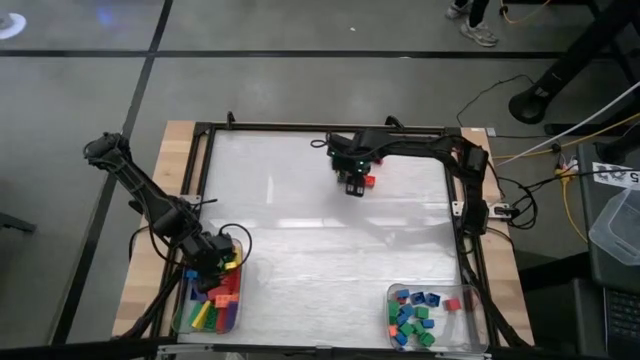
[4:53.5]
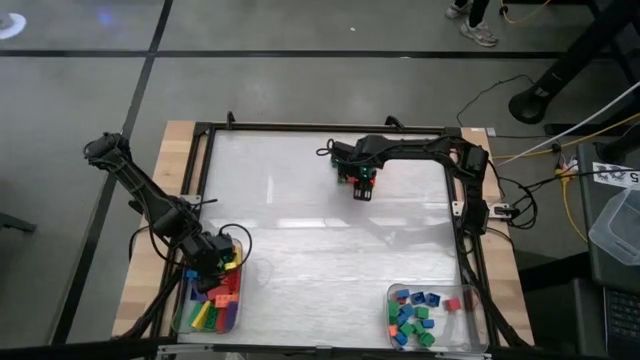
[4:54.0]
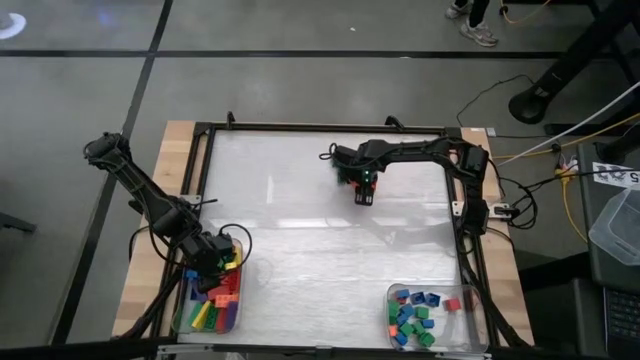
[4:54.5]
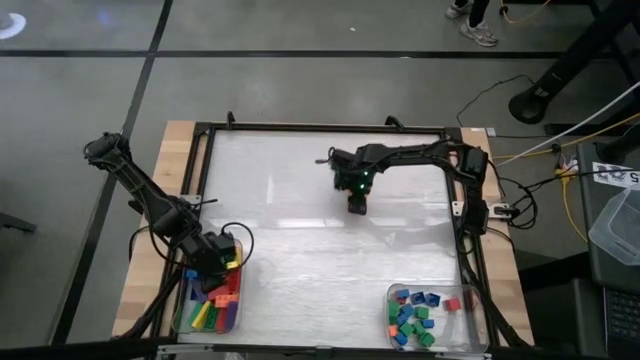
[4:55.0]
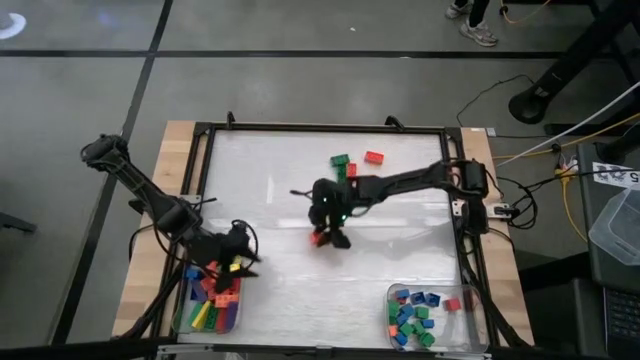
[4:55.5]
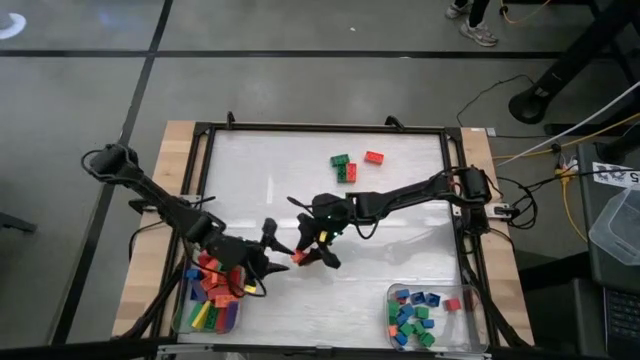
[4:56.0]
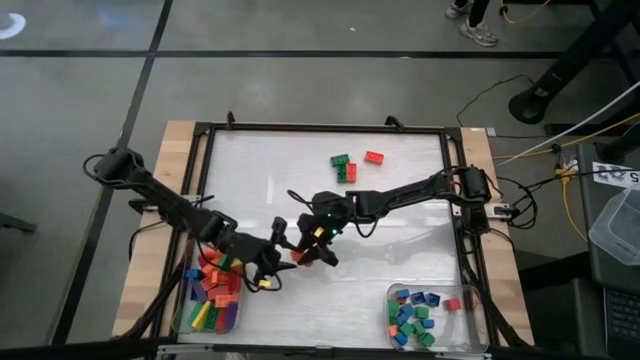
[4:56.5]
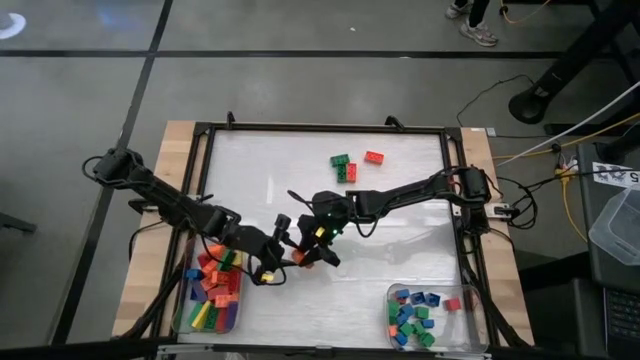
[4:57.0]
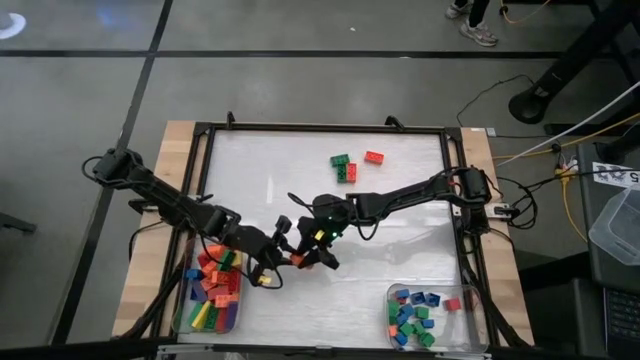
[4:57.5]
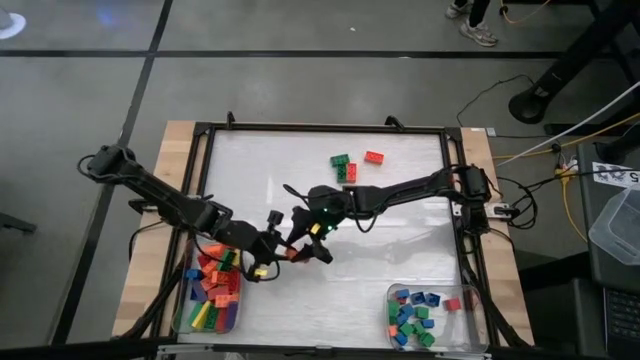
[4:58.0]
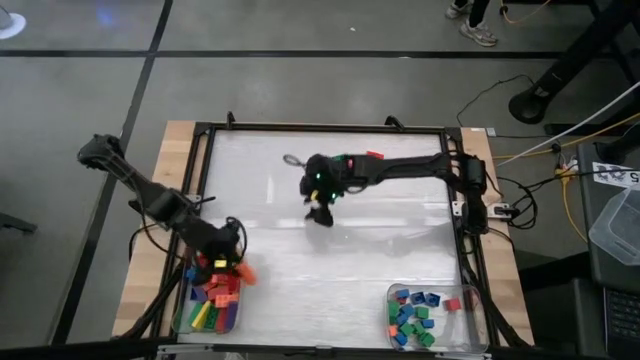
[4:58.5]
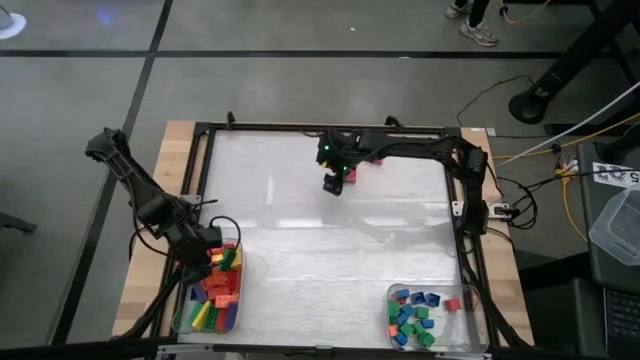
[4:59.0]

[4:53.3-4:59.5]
Task: Sort blocks by size
Put the large orange game piece into the left transparent bin

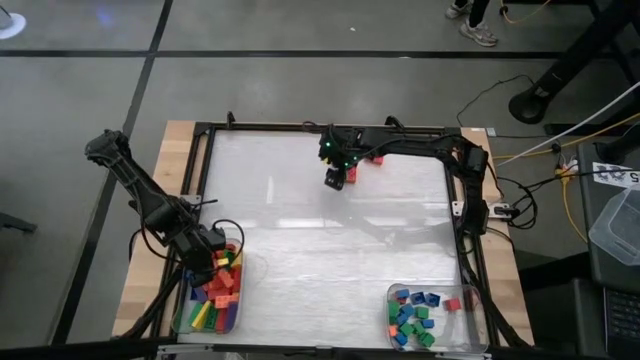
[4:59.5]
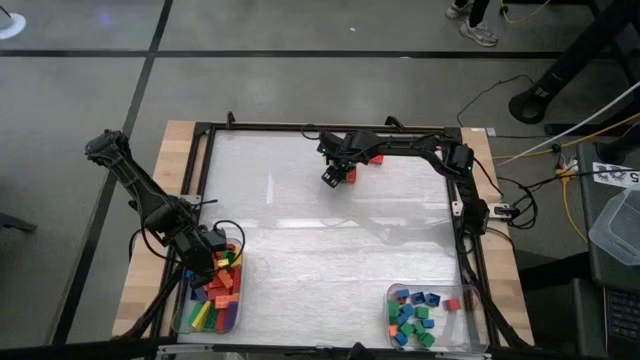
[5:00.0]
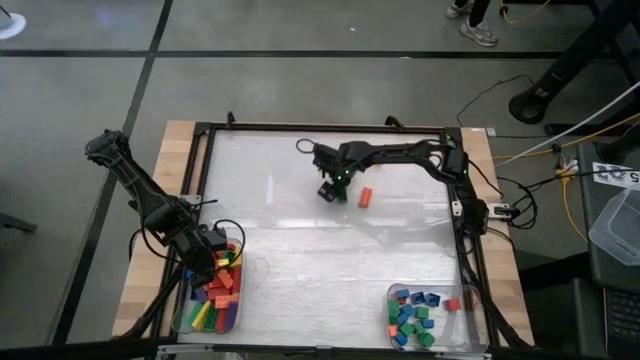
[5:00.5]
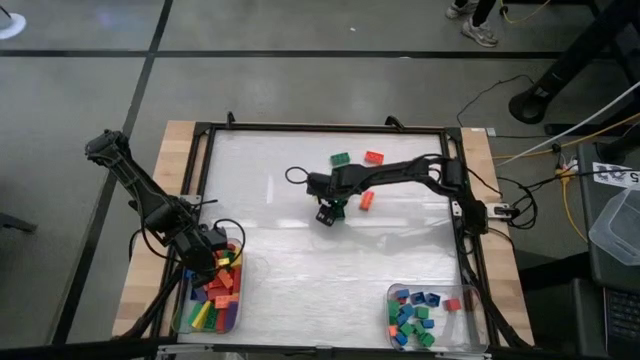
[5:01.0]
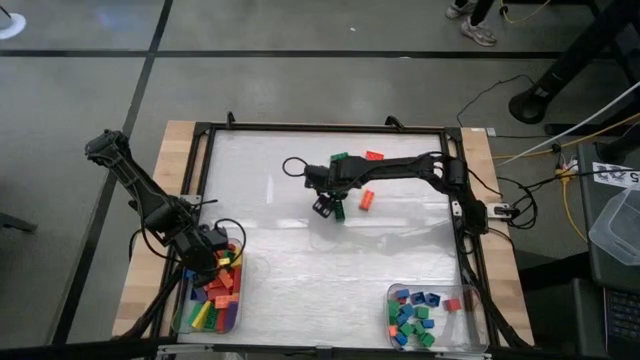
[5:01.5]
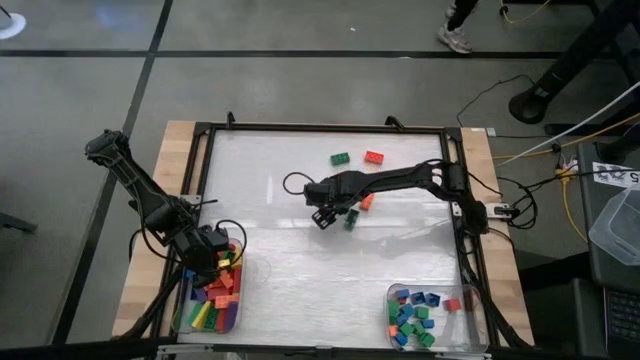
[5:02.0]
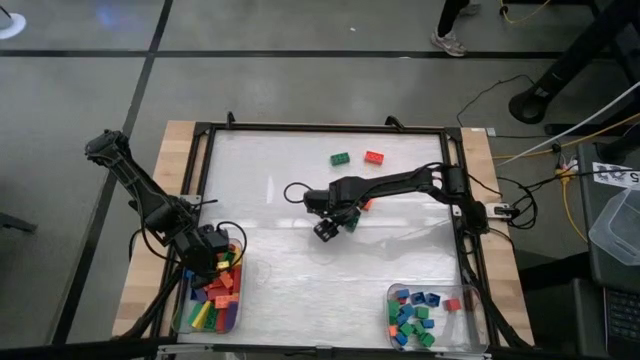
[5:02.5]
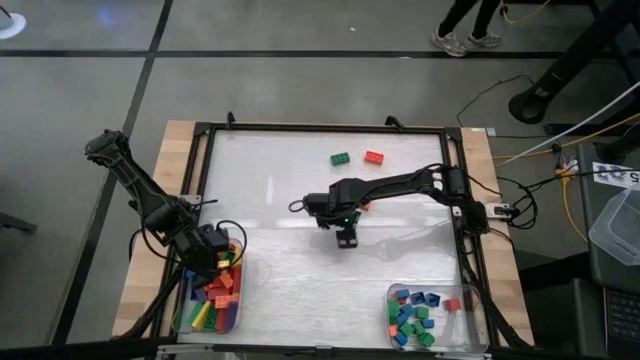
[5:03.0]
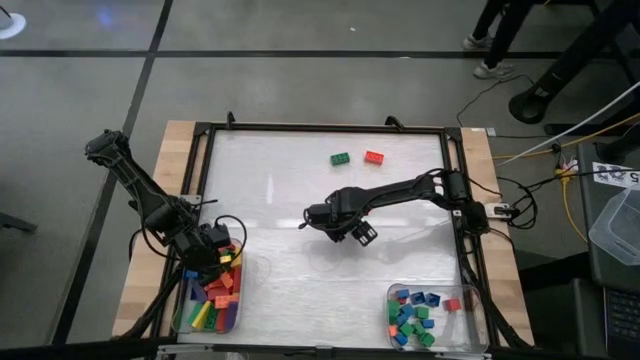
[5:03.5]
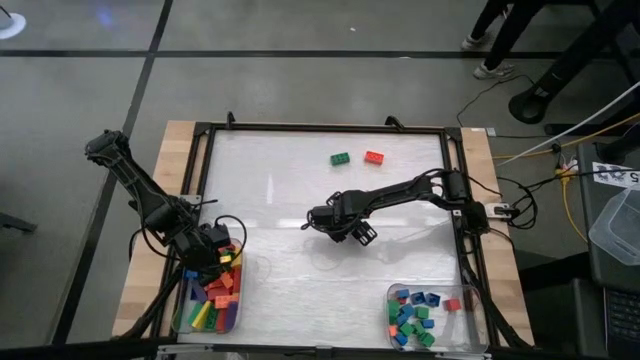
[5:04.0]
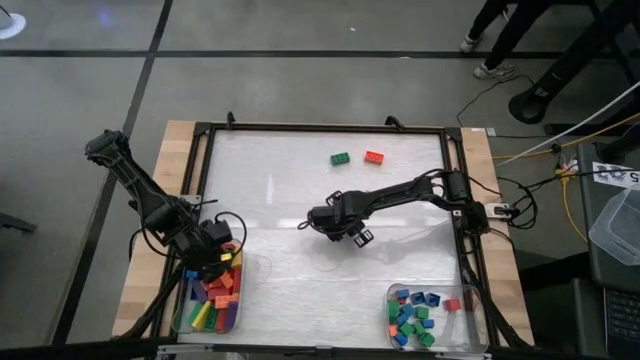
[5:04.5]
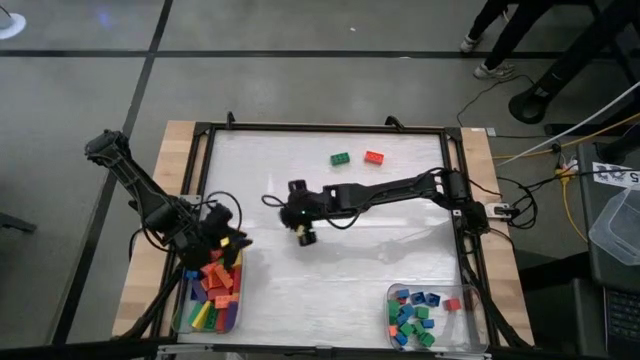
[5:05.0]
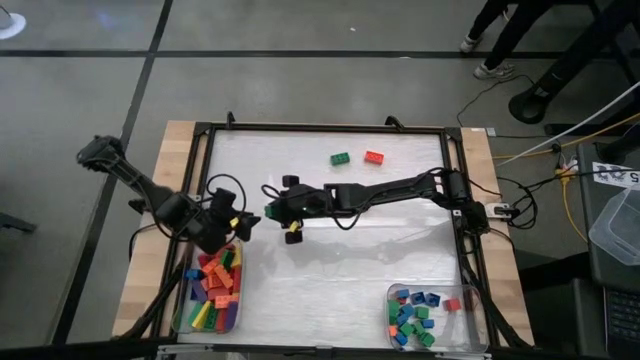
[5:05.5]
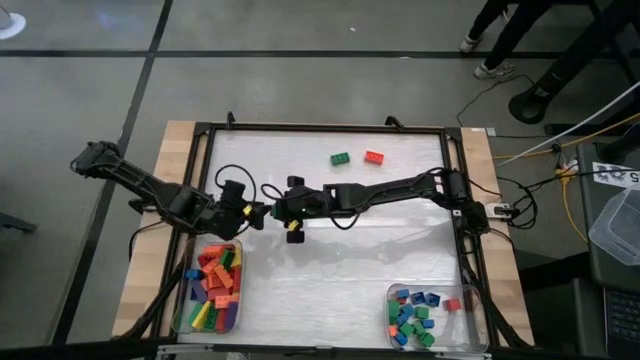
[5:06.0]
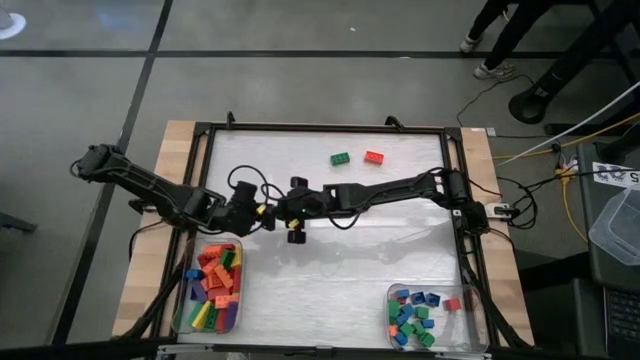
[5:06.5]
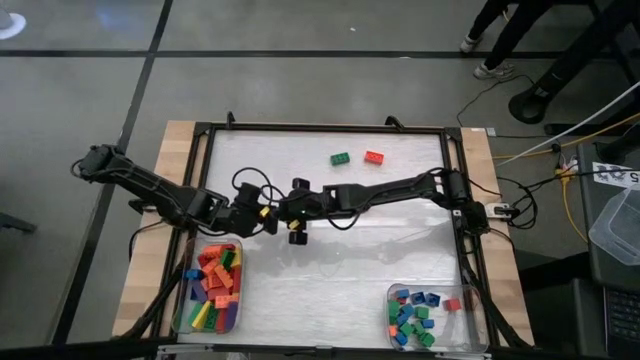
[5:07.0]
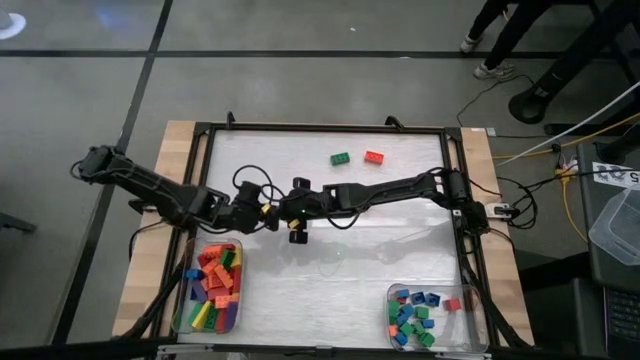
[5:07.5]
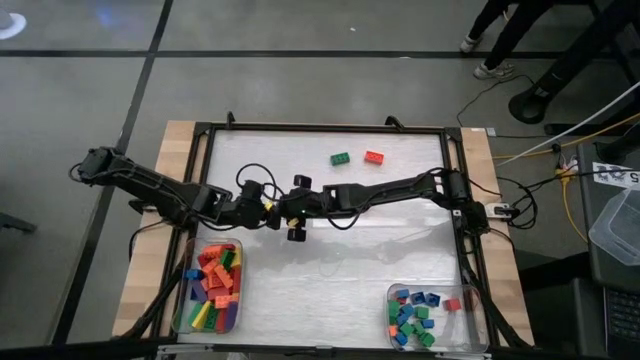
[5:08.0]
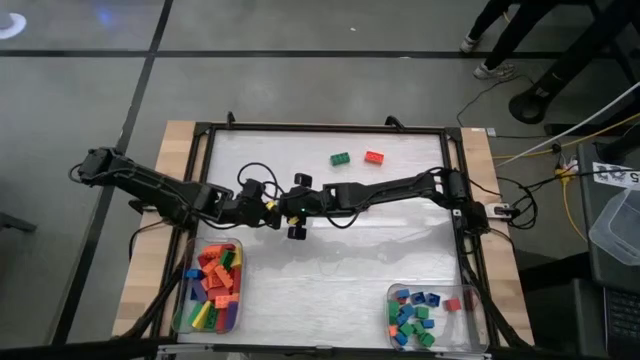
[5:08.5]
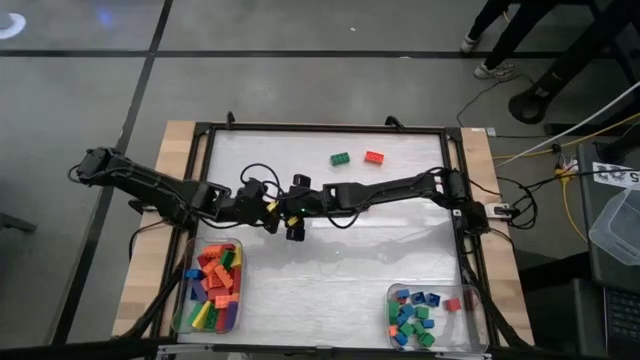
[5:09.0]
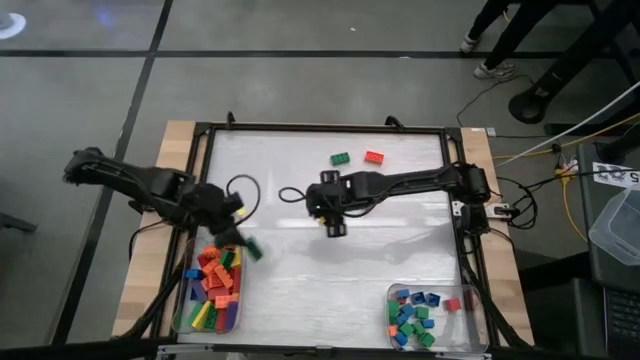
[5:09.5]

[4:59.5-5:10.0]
Put the large green game piece into the left transparent bin

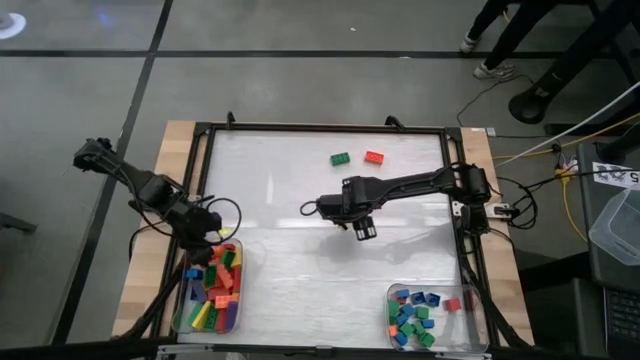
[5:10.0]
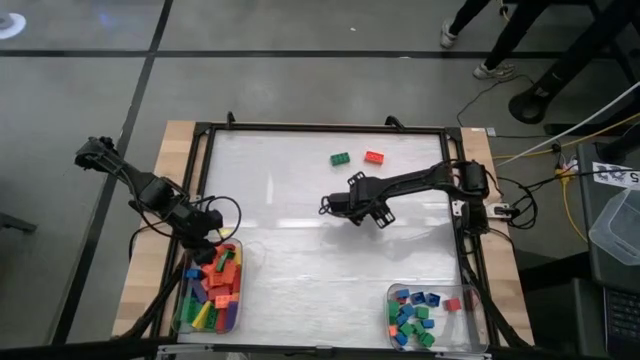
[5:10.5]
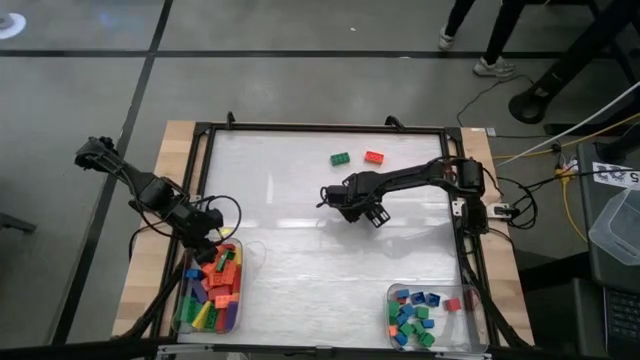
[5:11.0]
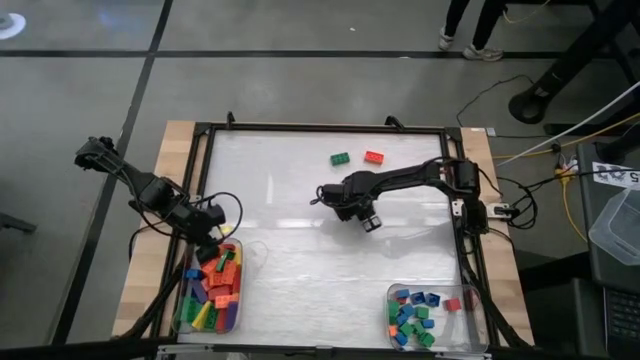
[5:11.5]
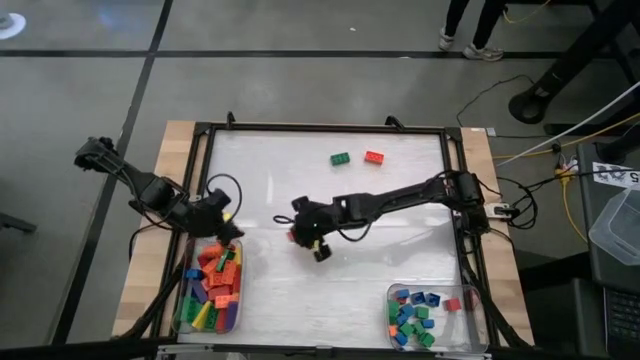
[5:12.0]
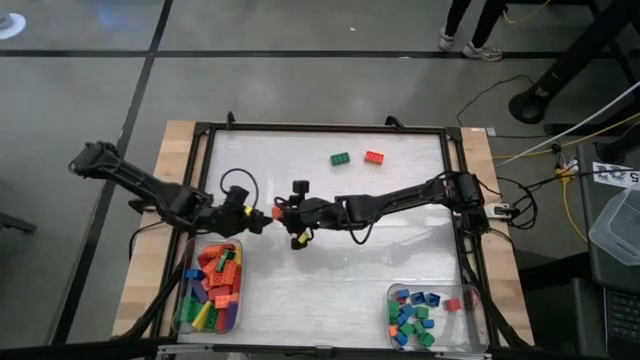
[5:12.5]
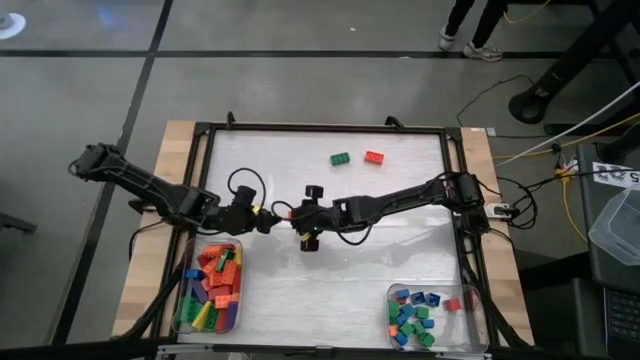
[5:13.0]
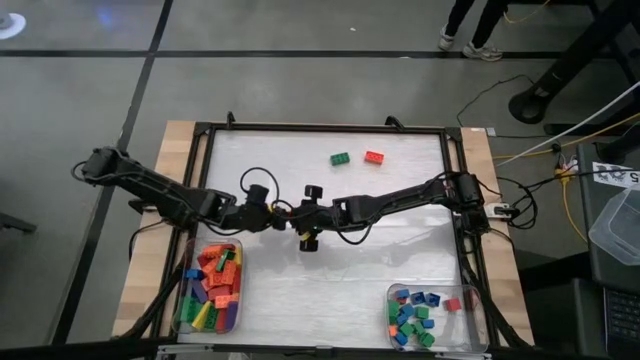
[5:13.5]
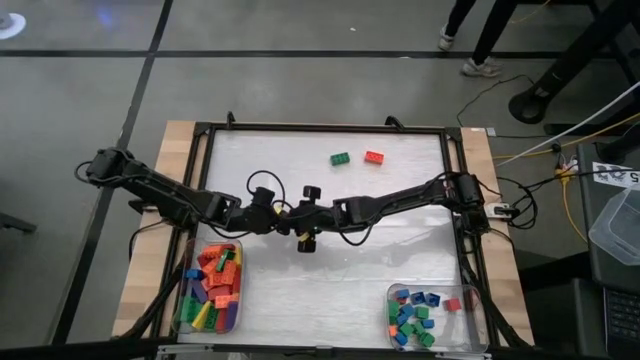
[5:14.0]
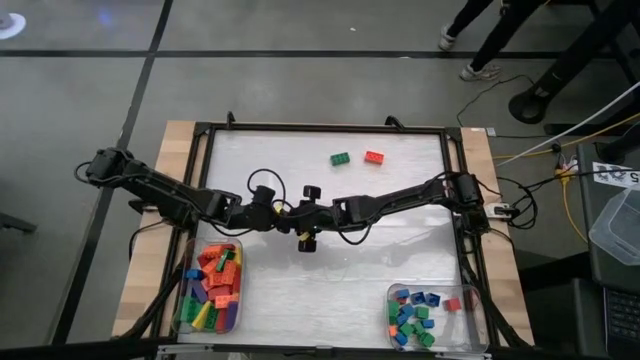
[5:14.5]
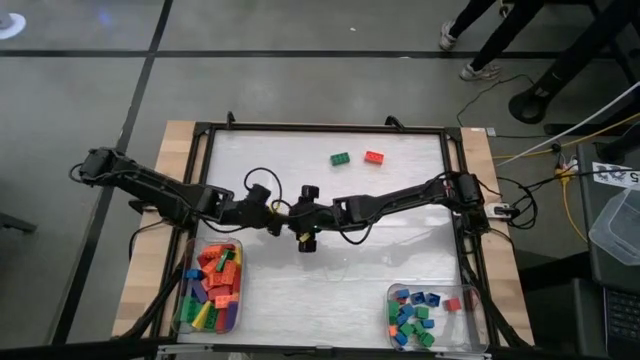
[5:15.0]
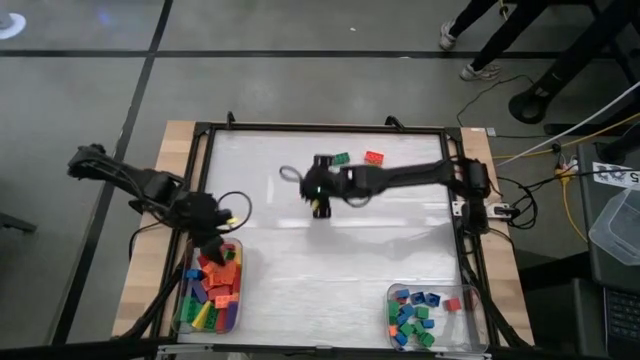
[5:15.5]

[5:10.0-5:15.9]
Put the large orange game piece into the left transparent bin

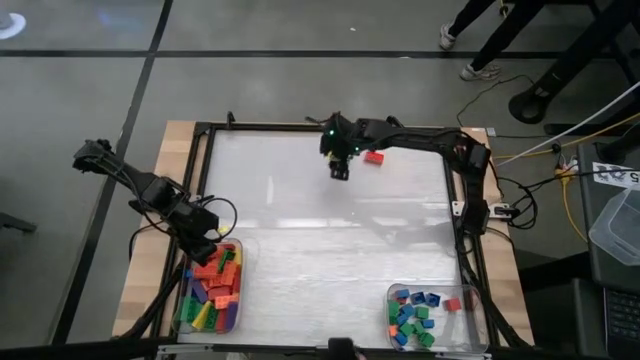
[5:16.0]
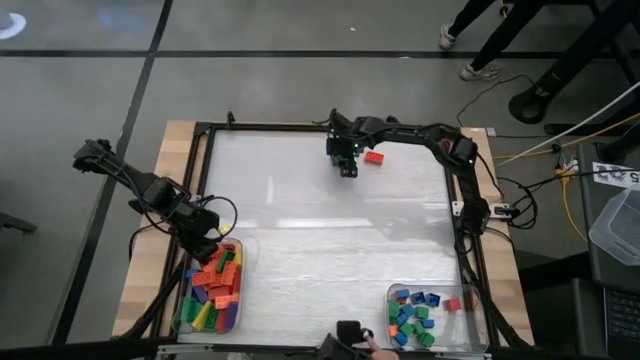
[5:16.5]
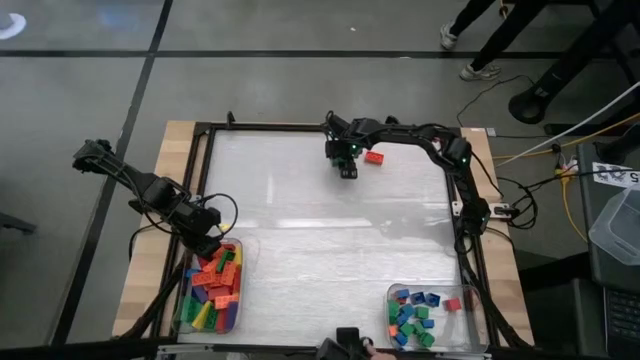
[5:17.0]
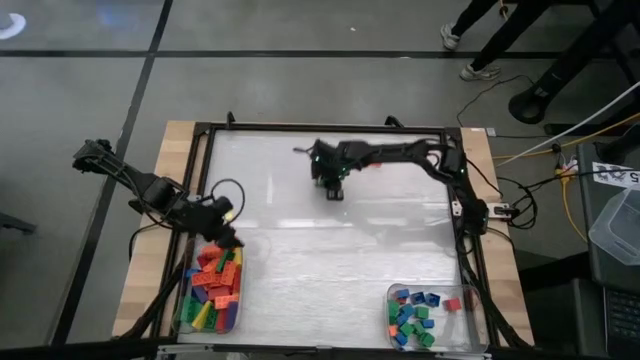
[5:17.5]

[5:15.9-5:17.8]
Put the large green game piece into the left transparent bin
